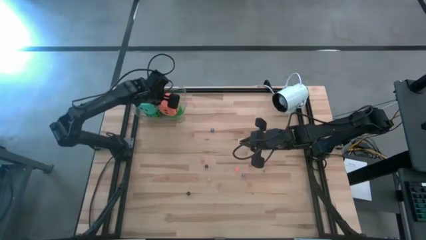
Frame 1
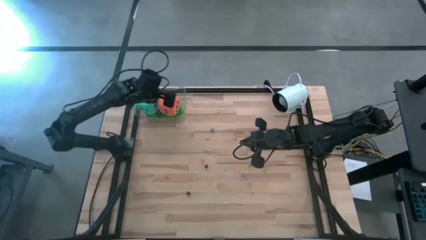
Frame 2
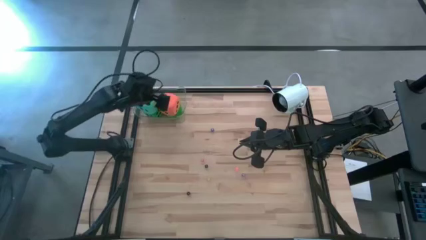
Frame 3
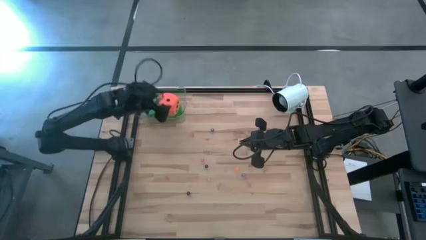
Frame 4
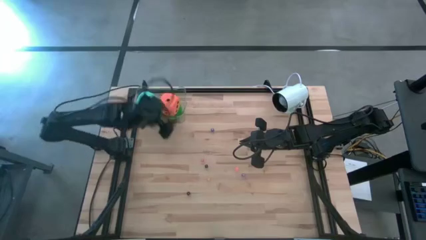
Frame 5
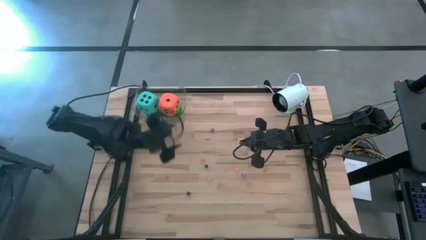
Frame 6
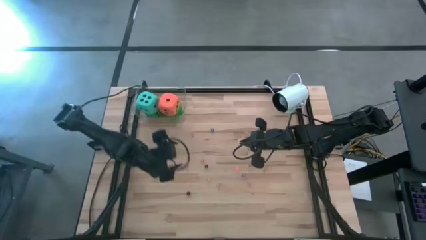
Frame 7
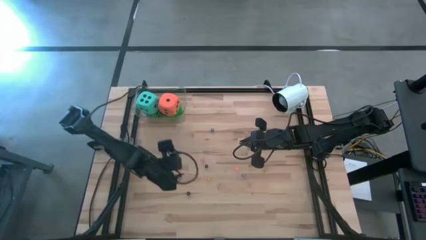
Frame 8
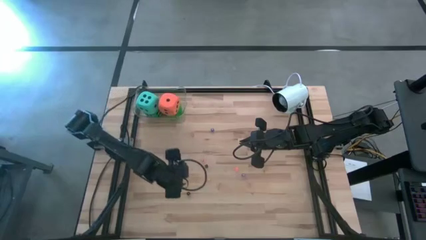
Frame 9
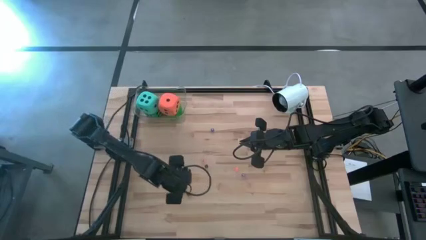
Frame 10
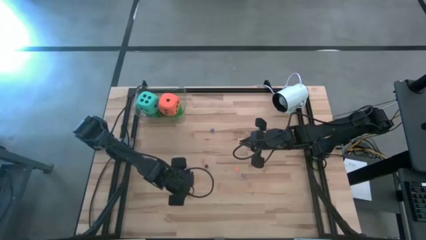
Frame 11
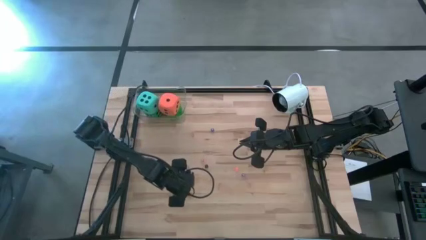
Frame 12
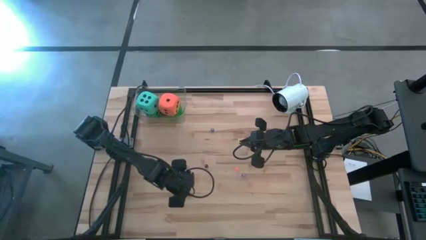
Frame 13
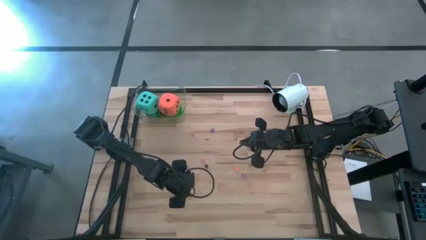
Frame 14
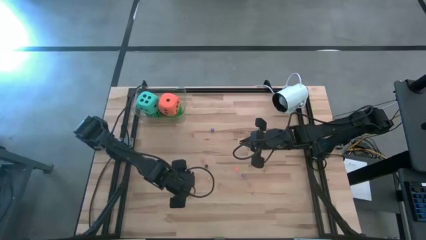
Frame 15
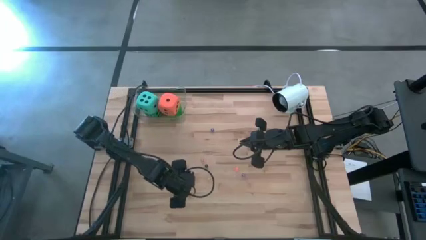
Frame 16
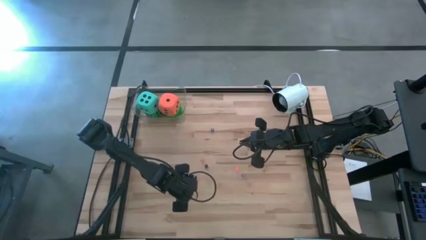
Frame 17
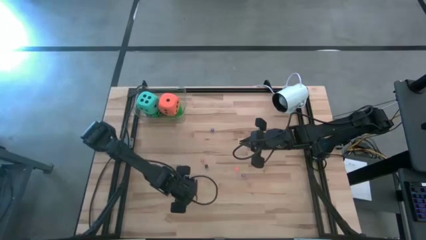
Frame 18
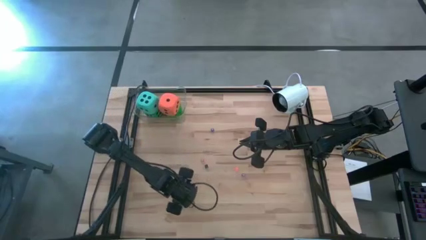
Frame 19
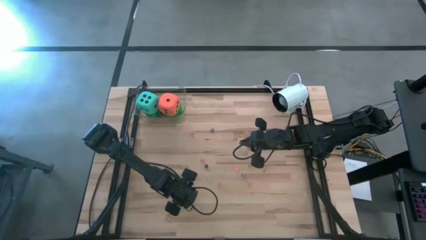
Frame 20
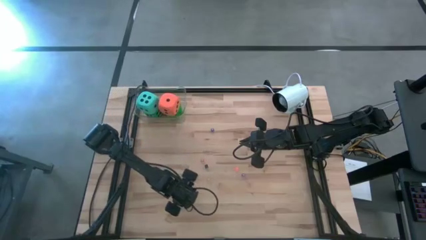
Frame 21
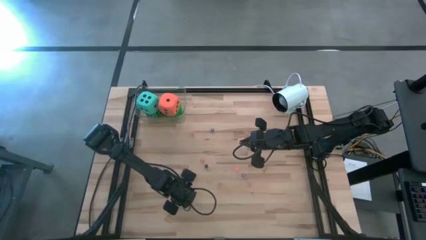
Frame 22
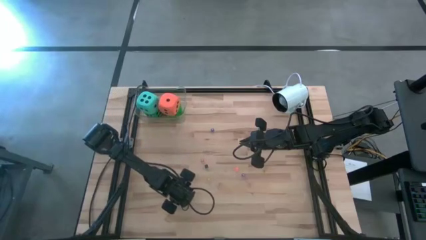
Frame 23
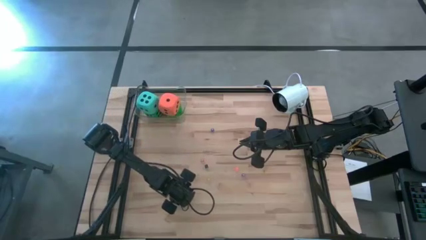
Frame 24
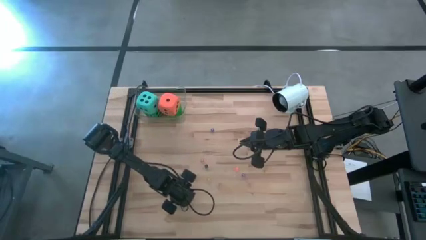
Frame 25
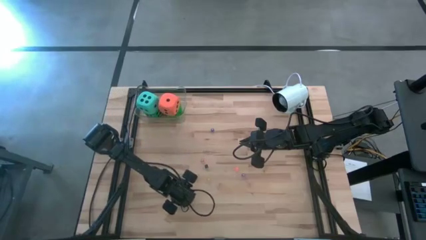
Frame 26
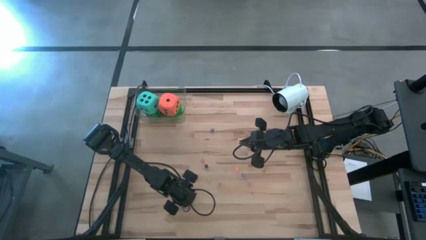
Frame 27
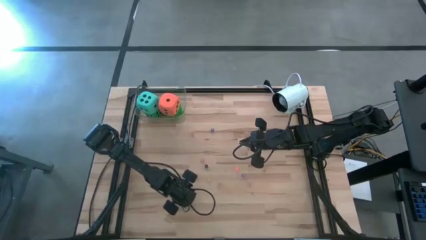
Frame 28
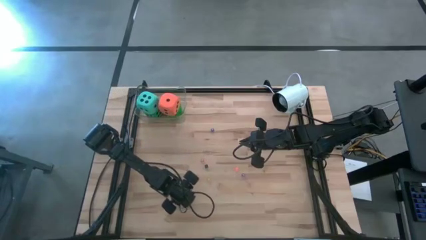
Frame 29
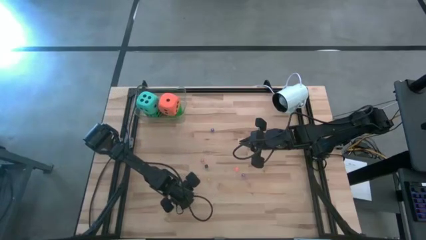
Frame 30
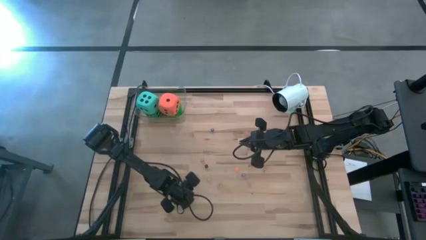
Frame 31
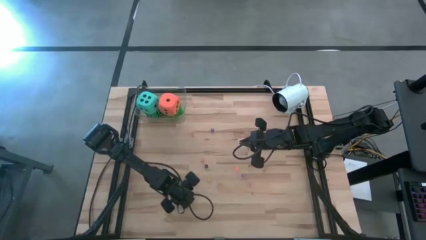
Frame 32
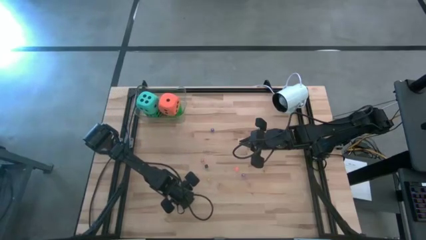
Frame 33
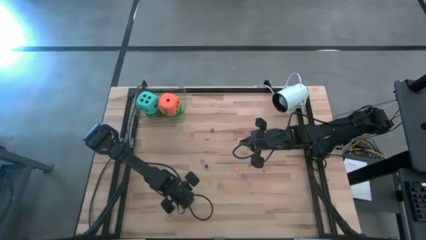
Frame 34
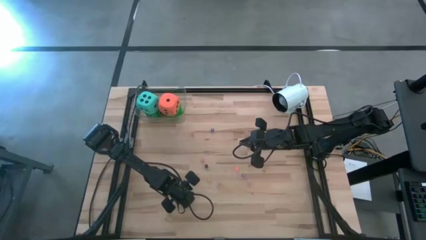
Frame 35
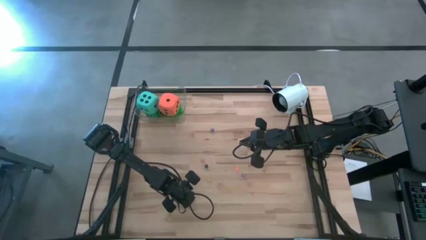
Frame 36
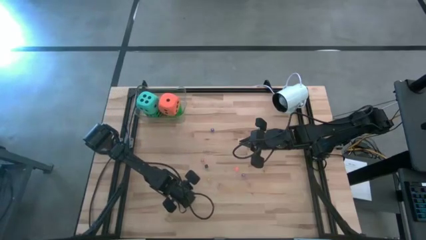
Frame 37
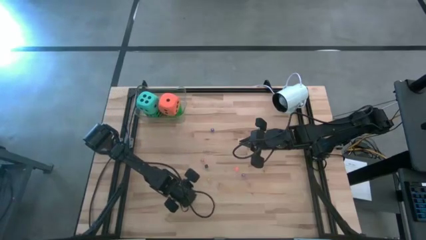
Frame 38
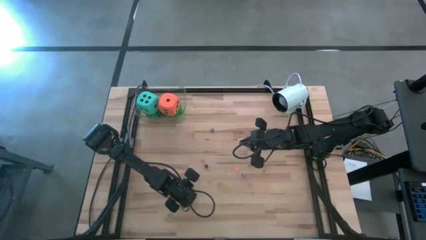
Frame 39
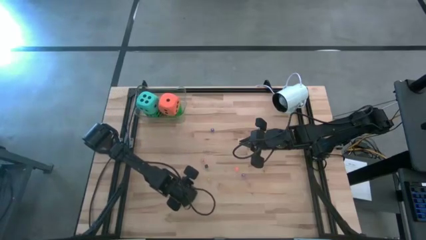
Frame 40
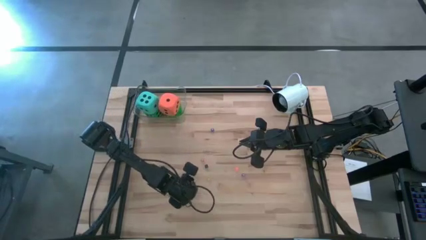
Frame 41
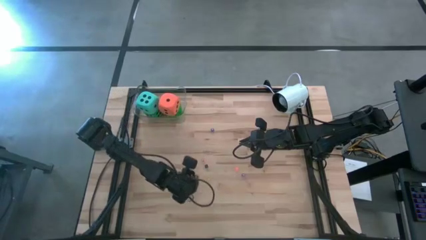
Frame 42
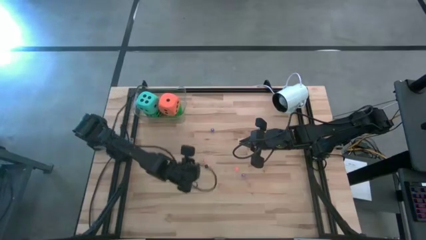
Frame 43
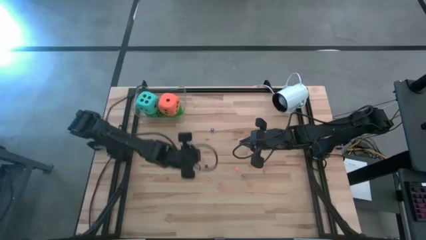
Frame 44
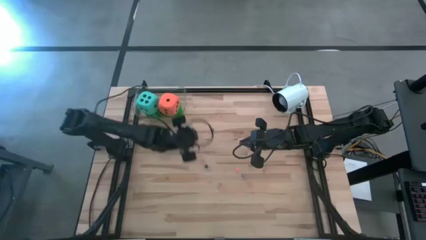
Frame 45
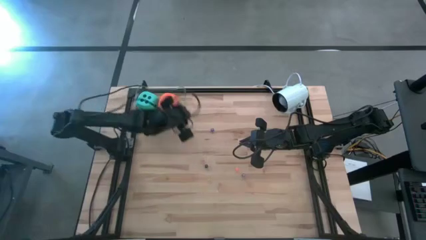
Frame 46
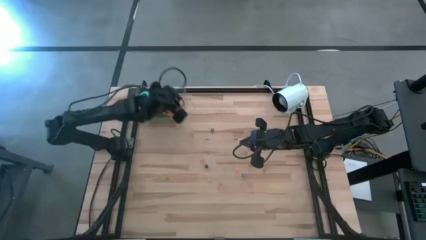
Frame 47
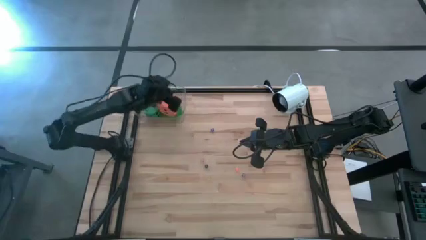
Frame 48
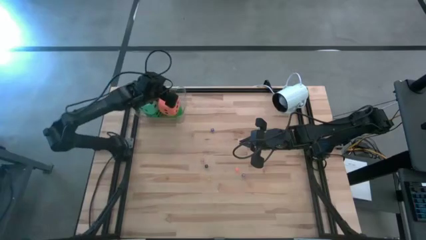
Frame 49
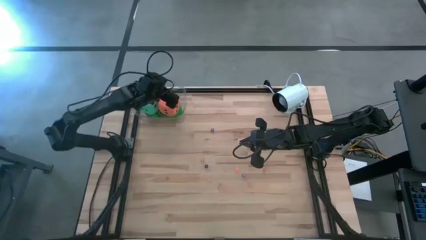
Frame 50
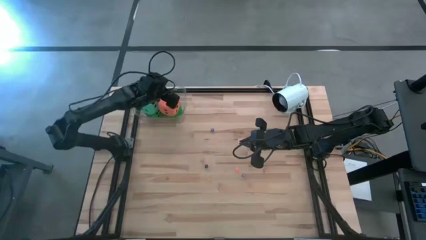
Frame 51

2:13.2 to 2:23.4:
Task: Pick & Place Dice
Put the bottom small black die into the transparent bin

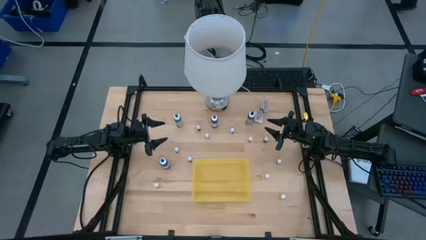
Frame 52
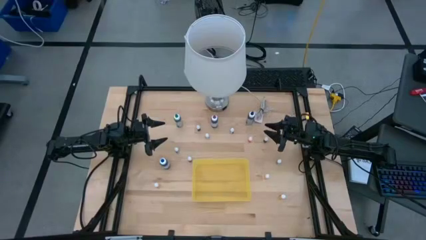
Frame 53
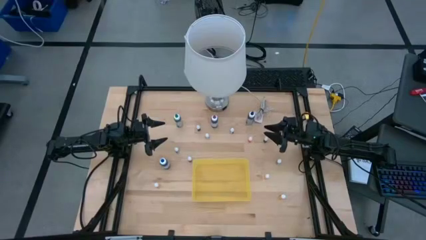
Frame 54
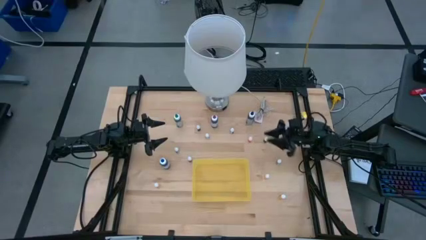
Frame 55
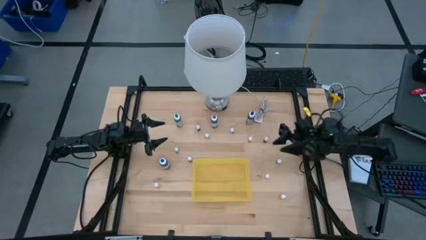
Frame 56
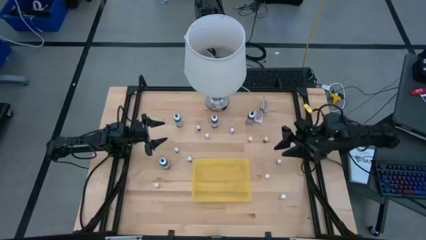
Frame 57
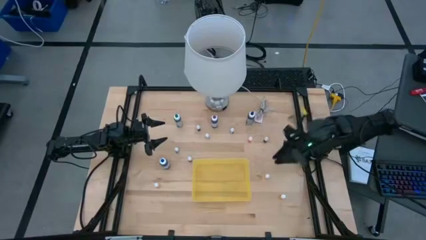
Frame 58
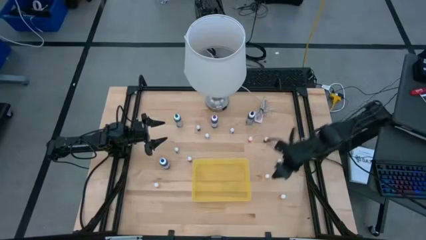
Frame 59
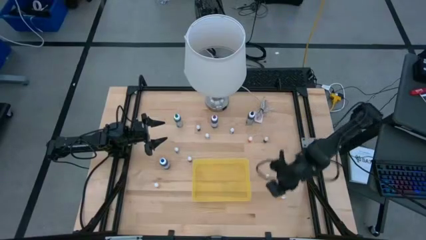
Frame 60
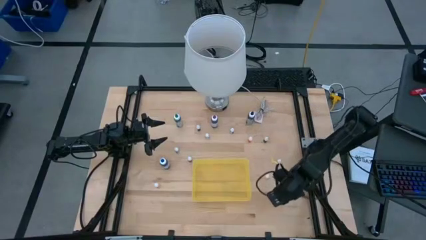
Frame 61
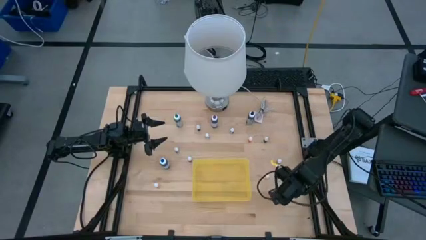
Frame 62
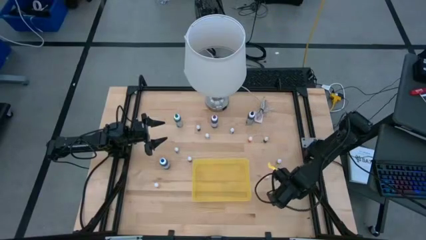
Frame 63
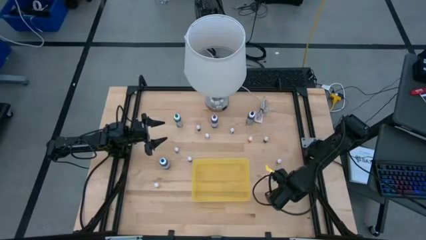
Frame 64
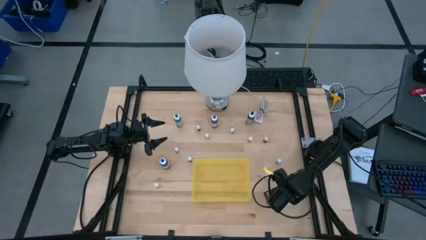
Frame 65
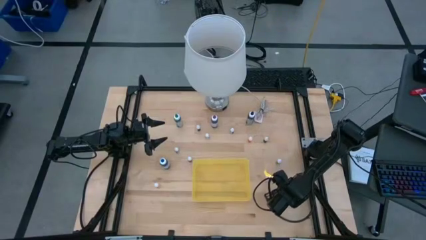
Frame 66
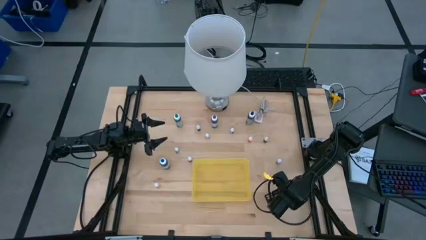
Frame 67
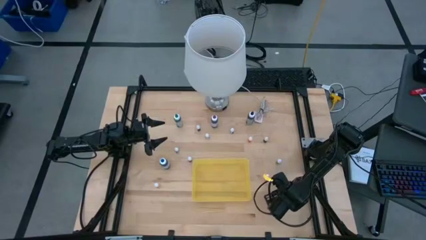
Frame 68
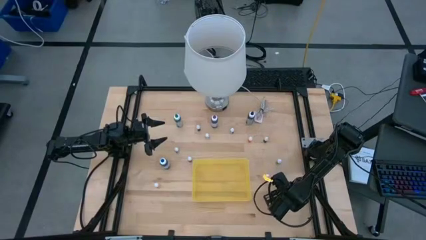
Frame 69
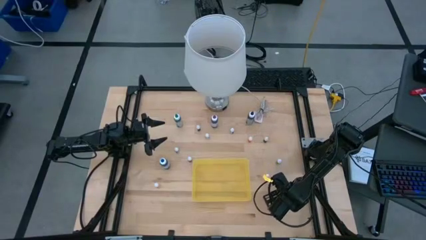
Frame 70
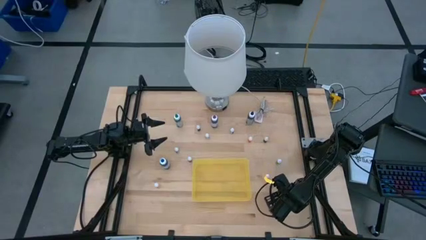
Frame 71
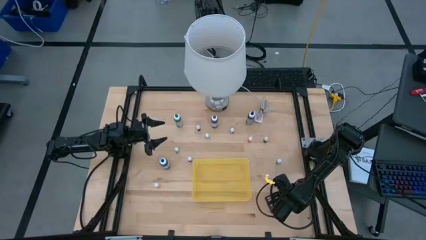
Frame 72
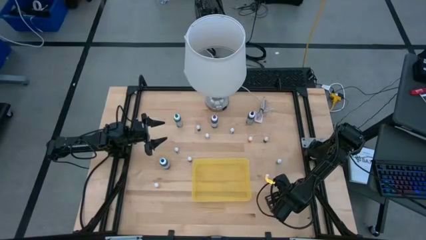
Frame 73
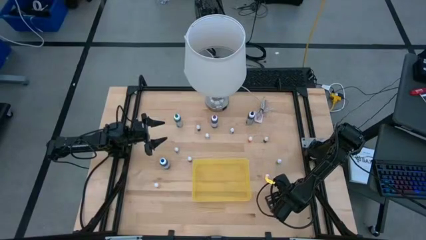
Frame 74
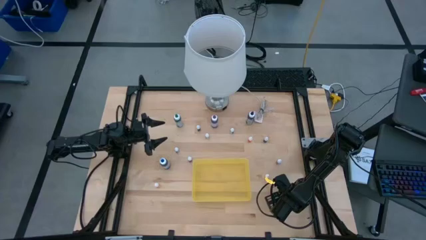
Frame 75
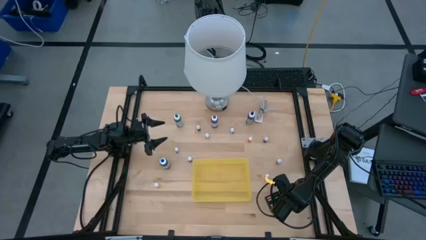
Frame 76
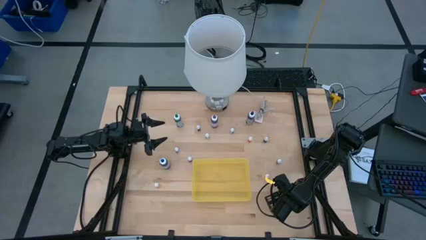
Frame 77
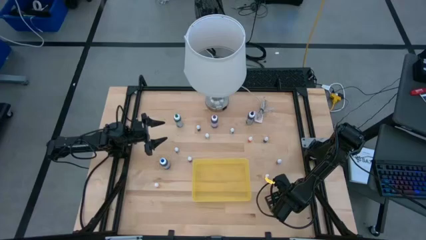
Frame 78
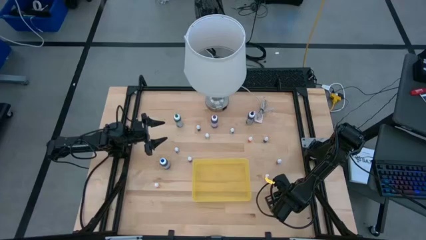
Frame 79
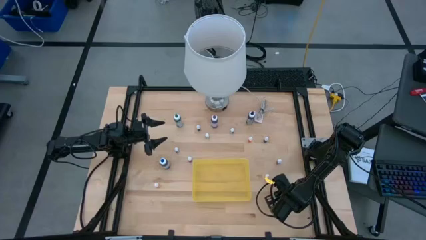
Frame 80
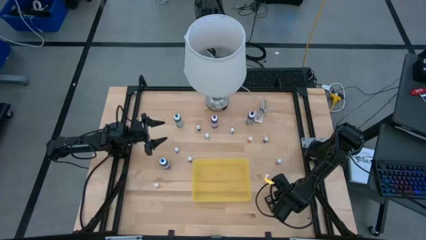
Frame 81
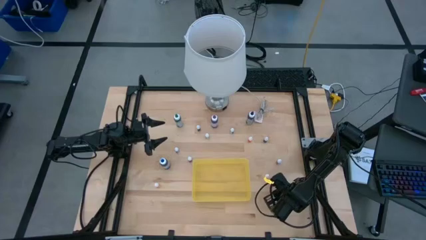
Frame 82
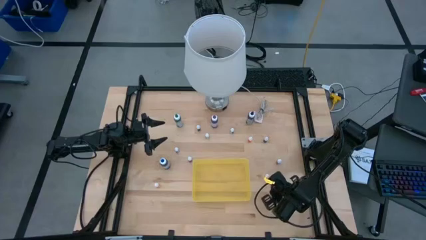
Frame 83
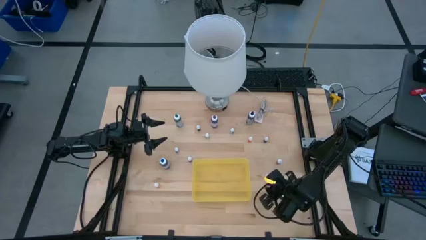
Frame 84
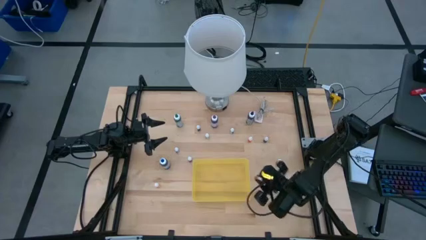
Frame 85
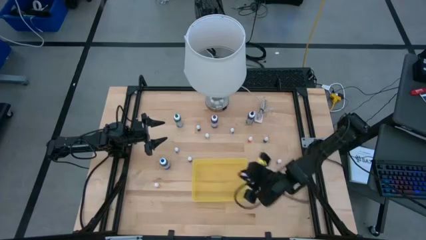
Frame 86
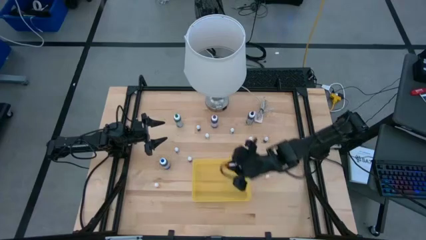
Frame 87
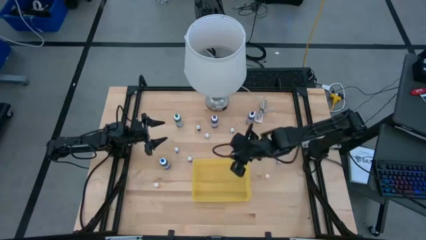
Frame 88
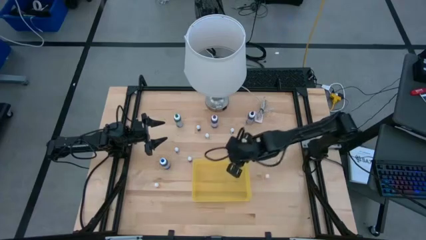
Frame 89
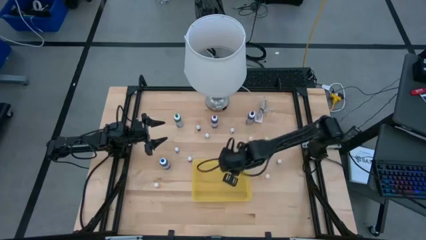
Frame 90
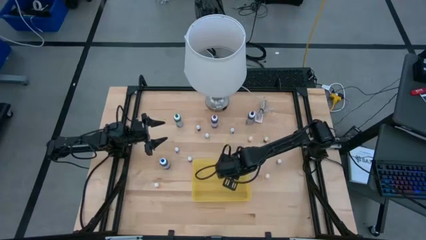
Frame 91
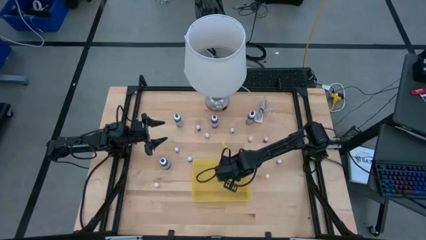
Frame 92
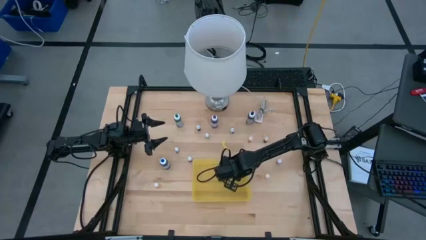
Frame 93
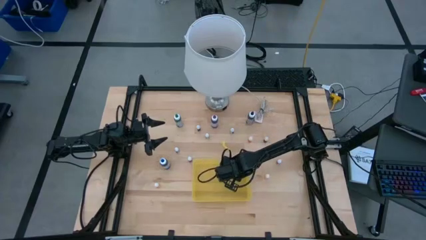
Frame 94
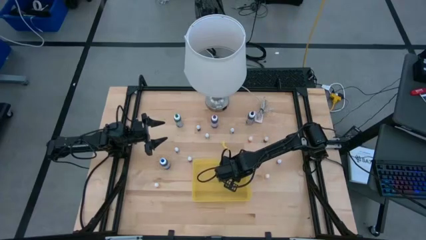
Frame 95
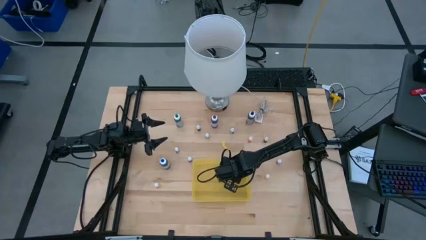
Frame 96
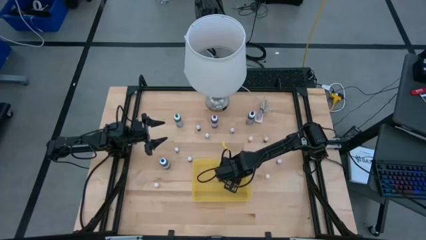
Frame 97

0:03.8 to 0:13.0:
Task: Pick & Place food coloring
Put the bottom right small orange food coloring bottle into the transparent bin
